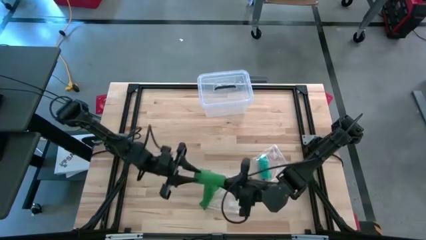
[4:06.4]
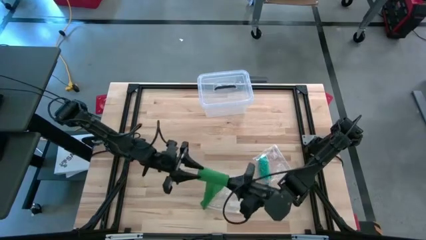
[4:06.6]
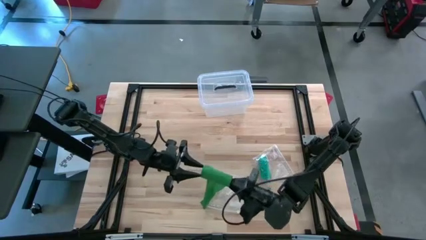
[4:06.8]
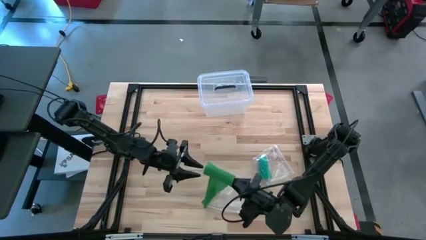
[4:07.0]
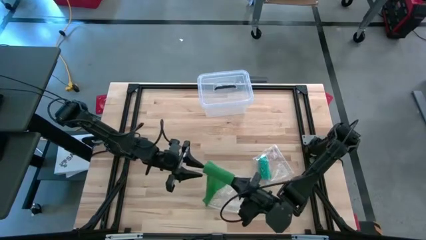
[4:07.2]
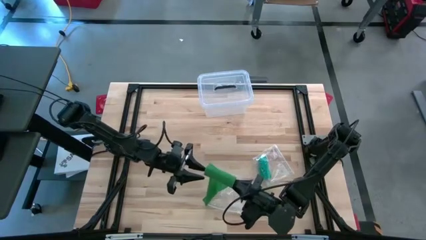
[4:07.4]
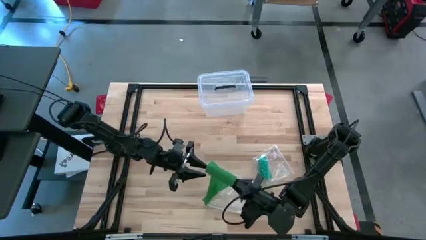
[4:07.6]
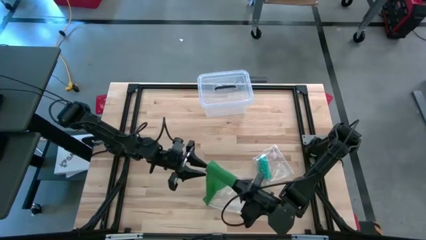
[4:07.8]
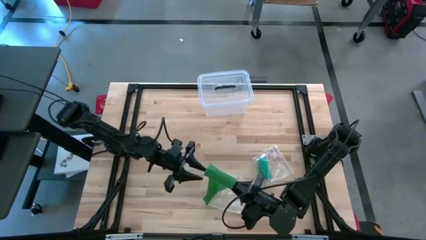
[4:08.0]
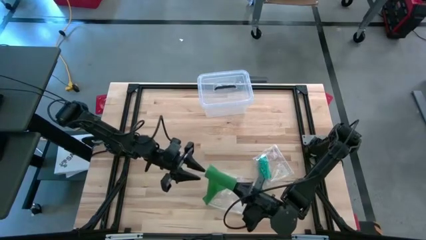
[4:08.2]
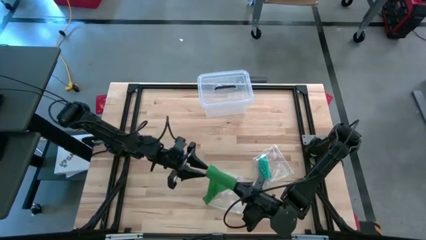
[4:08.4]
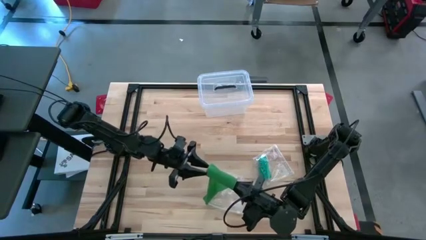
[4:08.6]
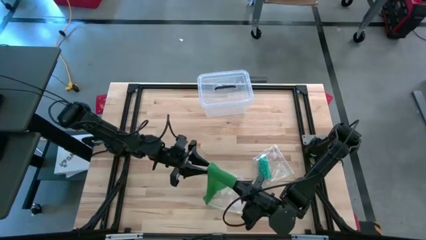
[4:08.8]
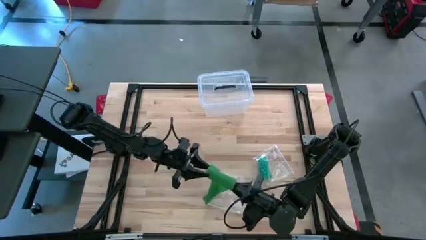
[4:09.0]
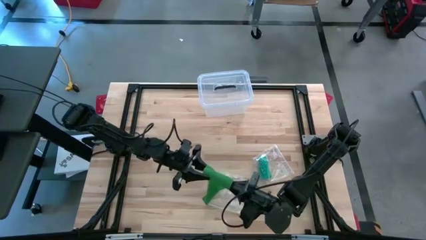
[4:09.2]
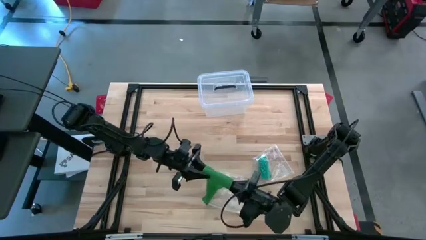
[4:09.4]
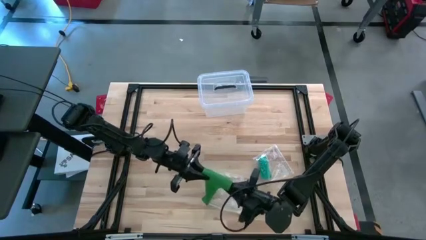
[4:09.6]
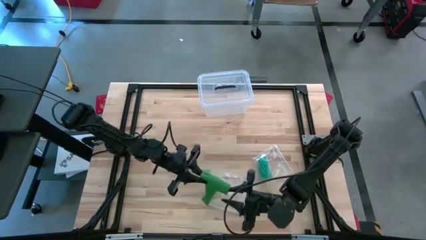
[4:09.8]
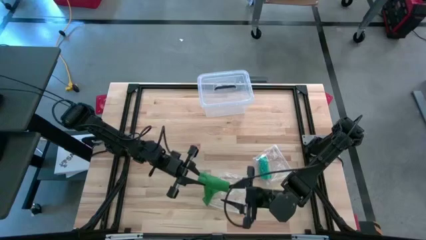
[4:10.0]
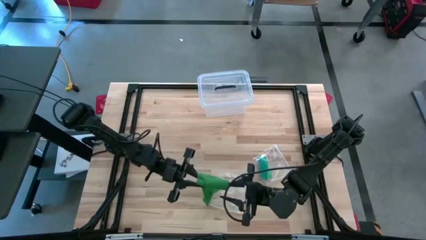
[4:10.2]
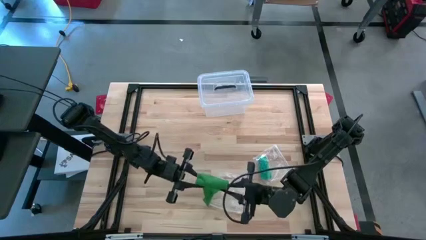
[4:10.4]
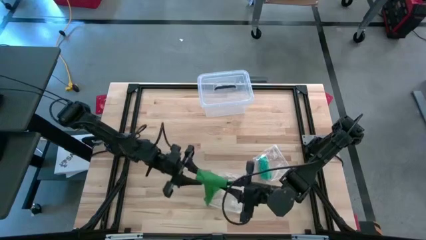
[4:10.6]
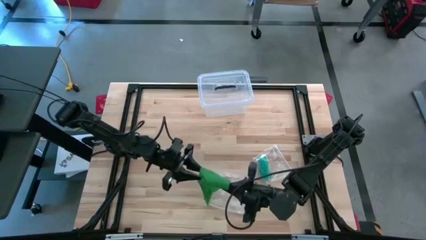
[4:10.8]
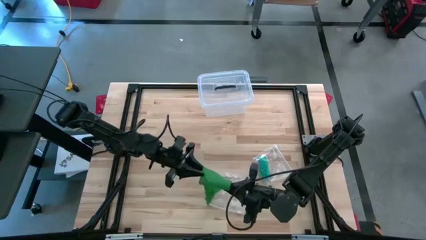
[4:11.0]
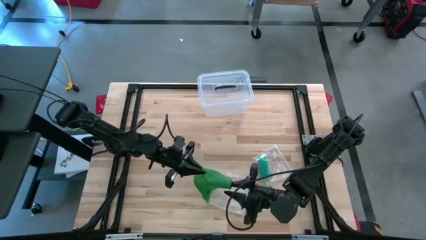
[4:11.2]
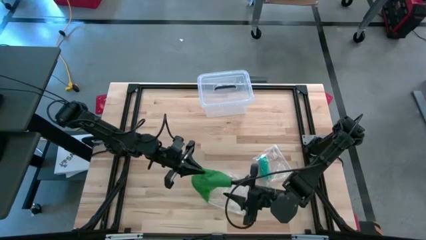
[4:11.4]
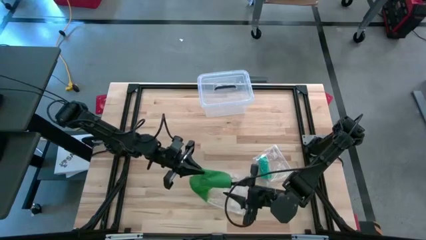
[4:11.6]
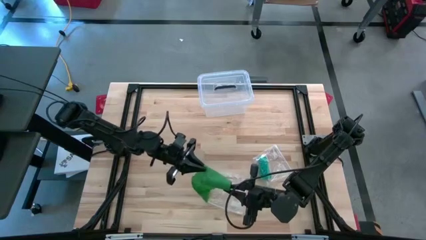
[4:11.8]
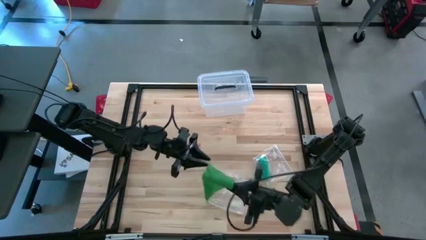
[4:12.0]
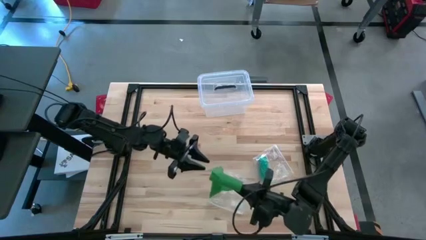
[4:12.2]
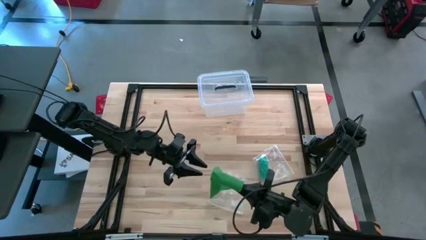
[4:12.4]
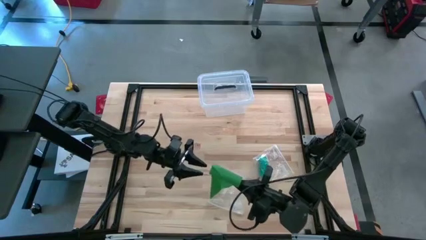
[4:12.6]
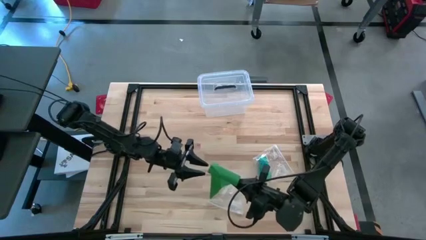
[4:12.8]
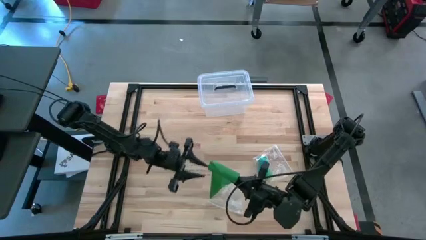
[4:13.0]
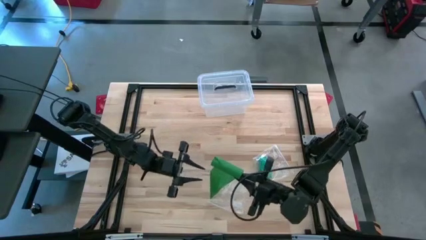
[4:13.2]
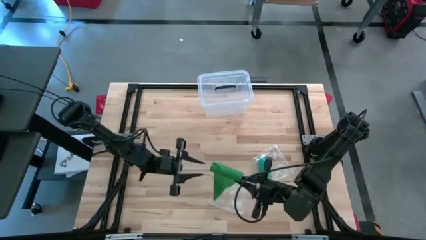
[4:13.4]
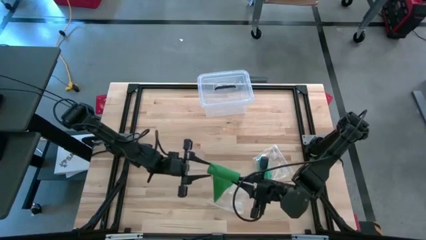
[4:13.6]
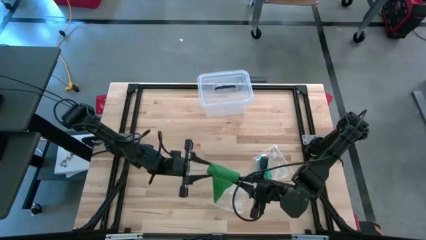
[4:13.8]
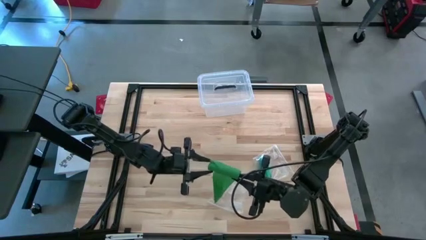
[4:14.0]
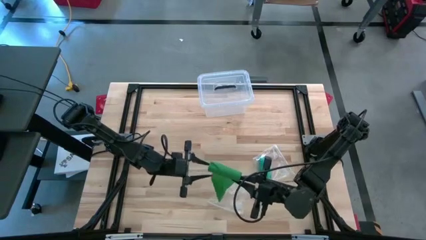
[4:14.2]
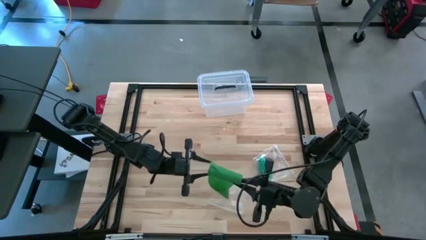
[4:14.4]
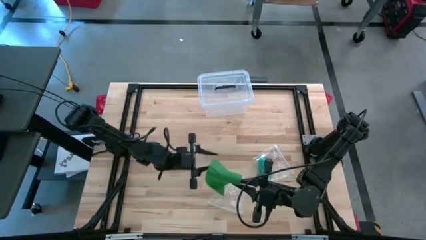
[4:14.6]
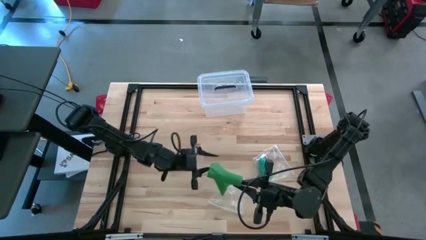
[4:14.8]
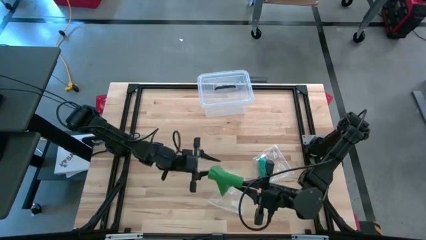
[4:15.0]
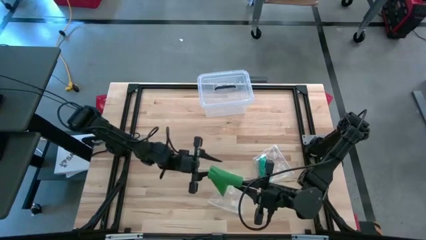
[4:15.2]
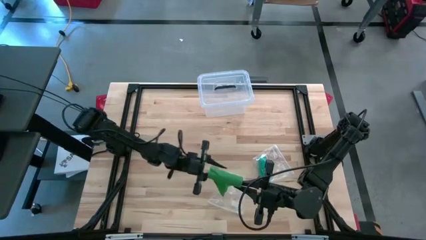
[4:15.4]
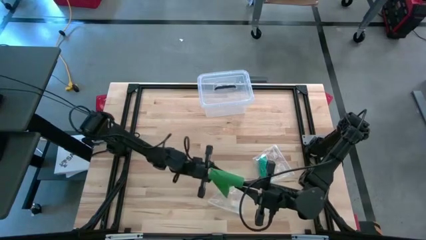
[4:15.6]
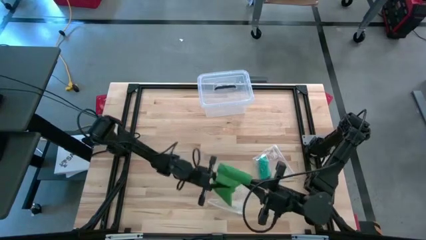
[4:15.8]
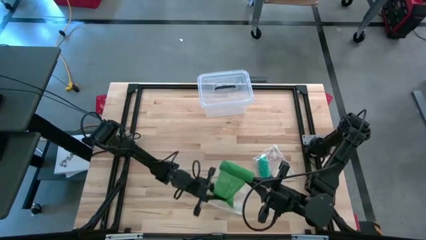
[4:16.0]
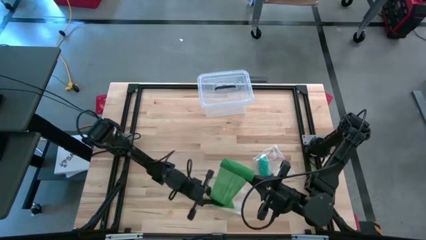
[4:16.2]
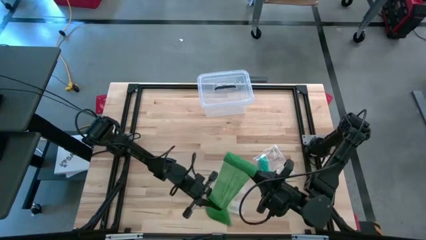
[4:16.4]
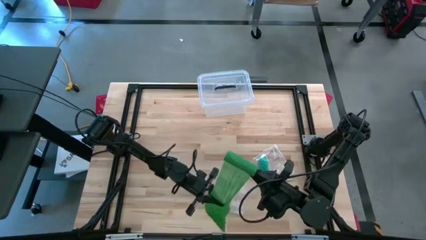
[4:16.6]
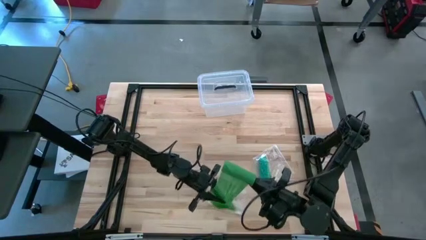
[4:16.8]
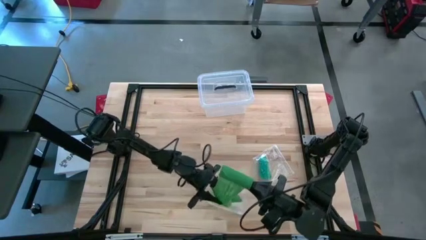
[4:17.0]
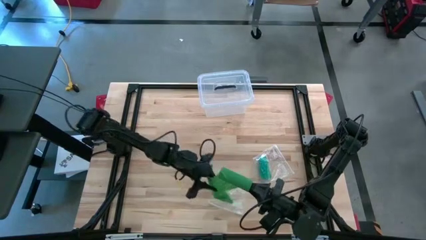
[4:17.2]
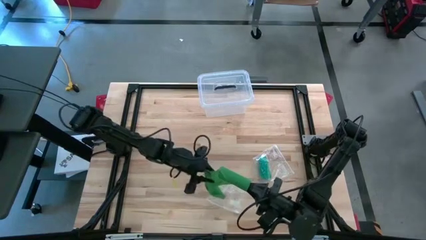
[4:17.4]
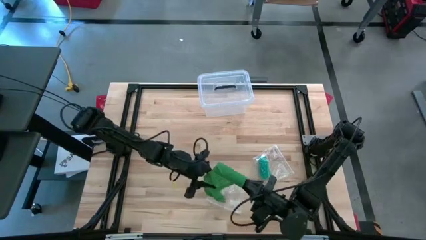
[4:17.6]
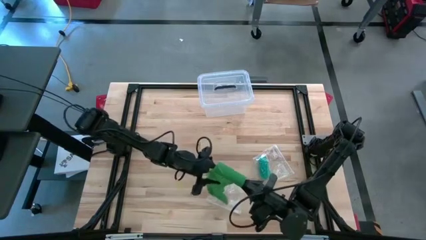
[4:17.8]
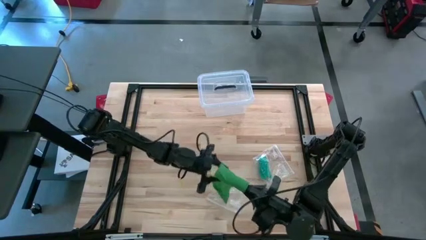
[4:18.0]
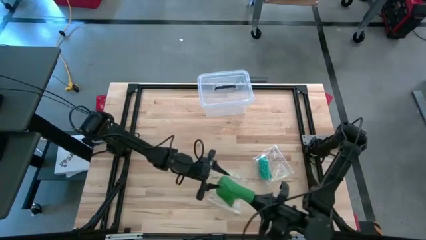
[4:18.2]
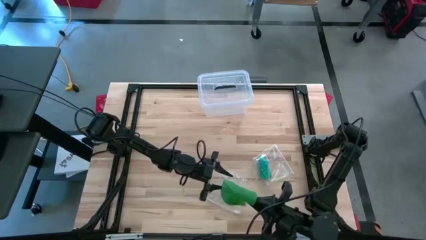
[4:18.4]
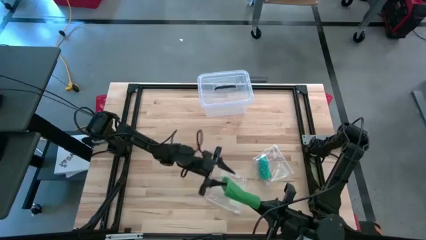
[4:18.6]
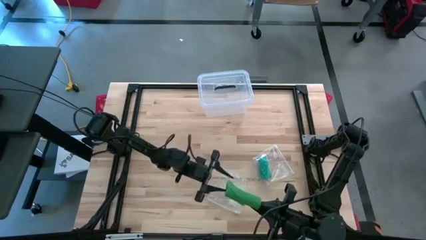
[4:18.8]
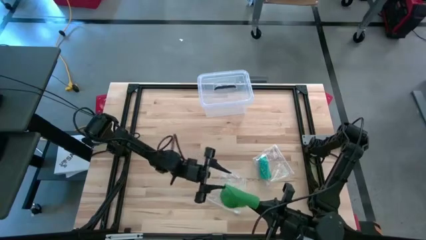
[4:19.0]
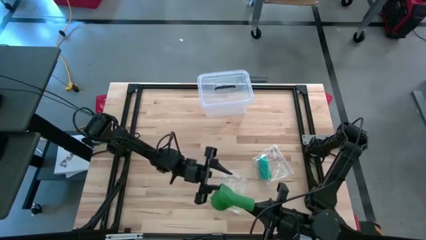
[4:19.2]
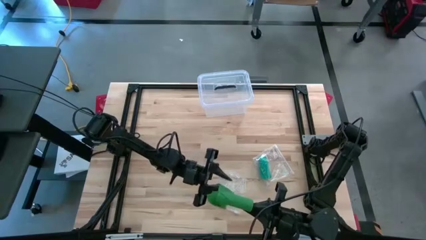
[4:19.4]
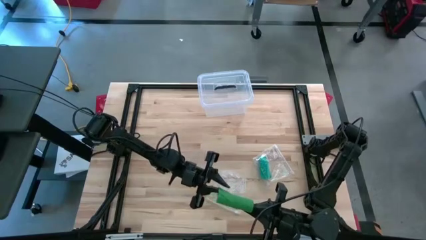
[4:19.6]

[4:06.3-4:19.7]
Task: Roll bandage
Roll the green bandage

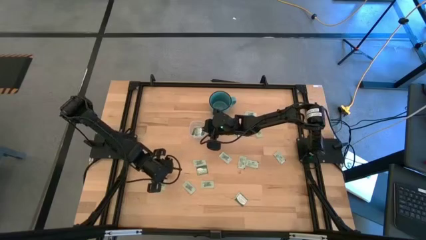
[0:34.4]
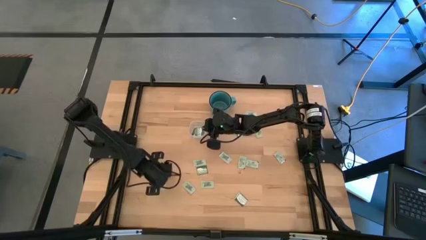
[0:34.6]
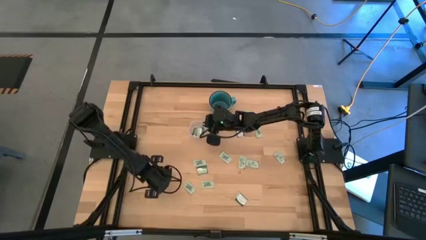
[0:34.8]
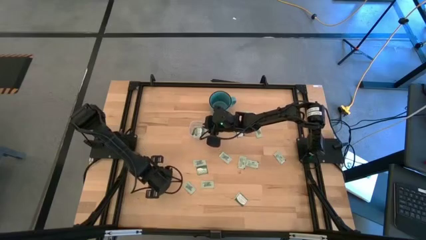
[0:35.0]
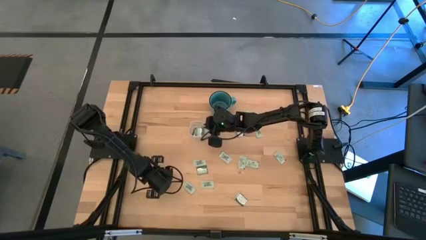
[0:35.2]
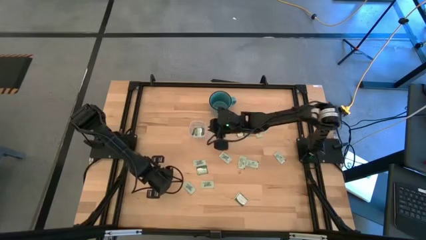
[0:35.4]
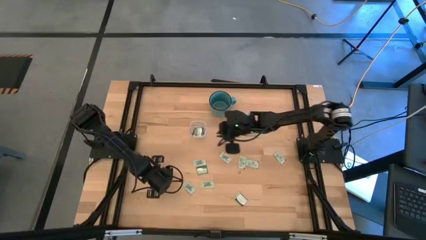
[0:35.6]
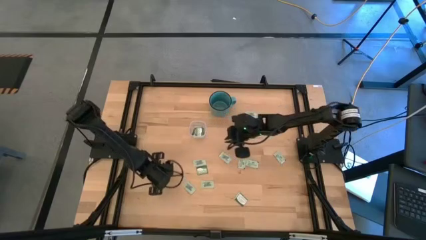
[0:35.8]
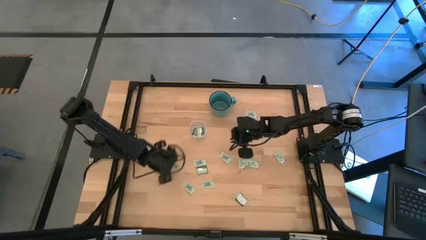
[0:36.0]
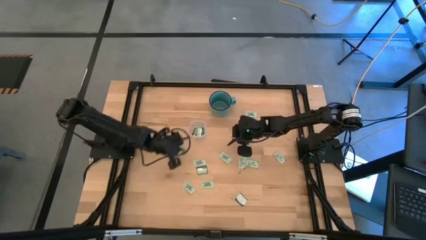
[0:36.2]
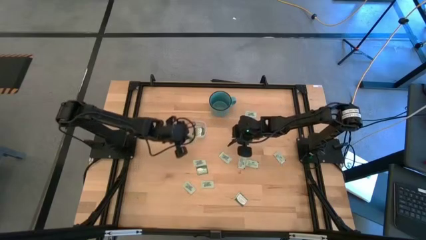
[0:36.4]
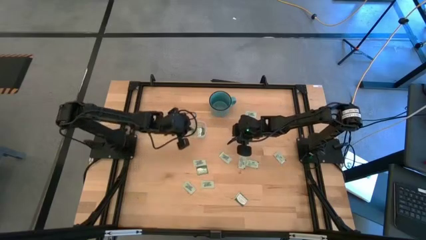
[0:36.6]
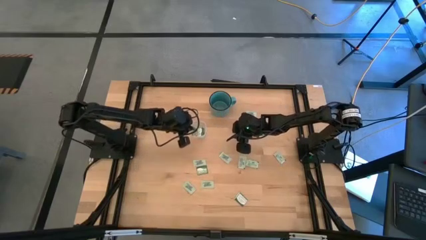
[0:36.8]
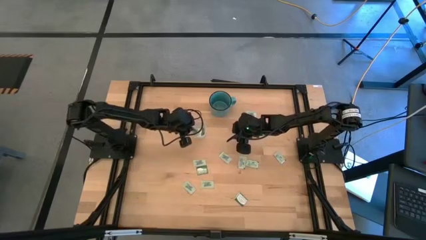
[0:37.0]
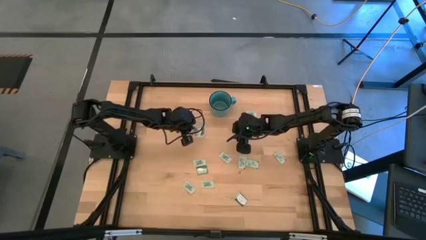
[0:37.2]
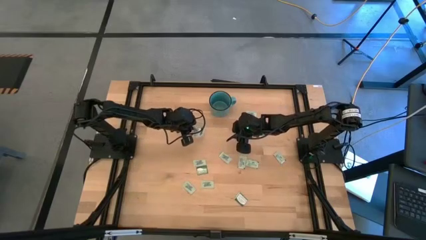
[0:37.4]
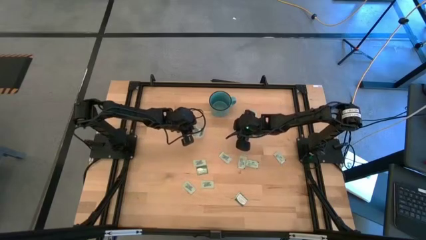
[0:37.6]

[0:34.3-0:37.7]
Task: Pick and place Stevia / Truvia into bins
Put the green stevia packet into the transparent container
